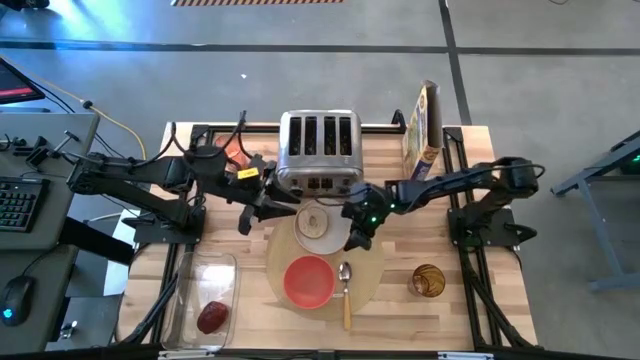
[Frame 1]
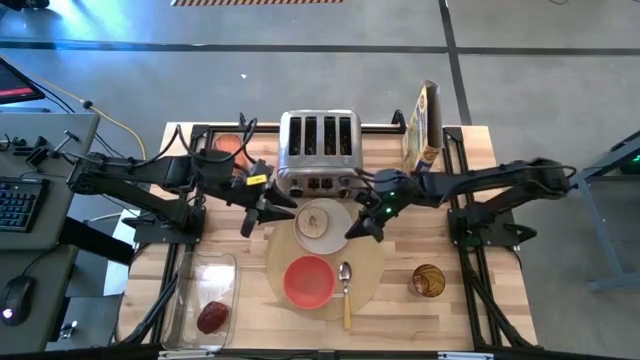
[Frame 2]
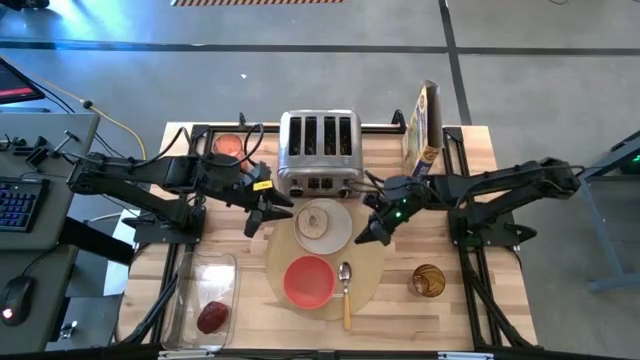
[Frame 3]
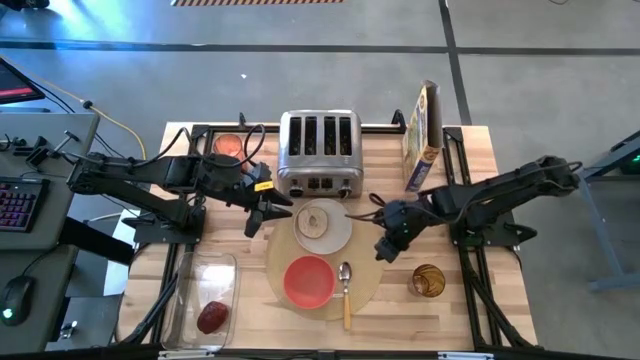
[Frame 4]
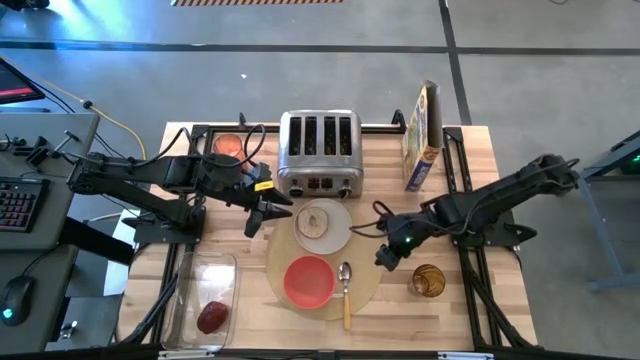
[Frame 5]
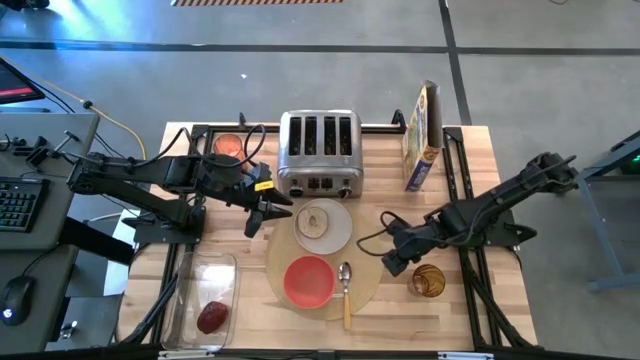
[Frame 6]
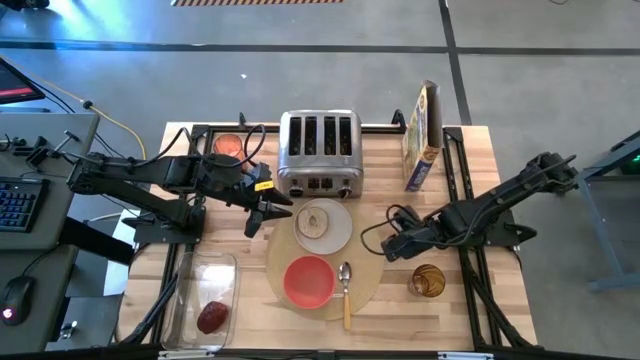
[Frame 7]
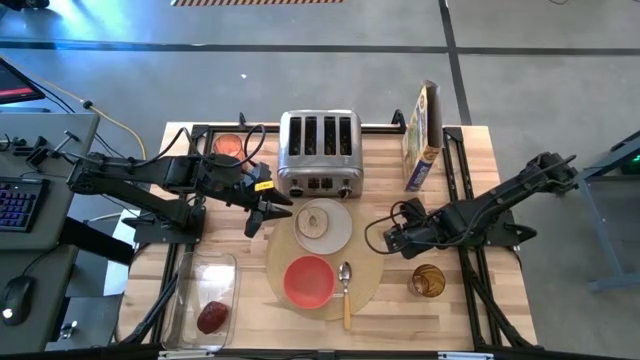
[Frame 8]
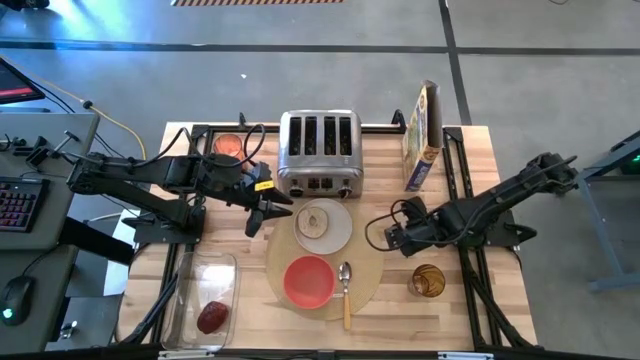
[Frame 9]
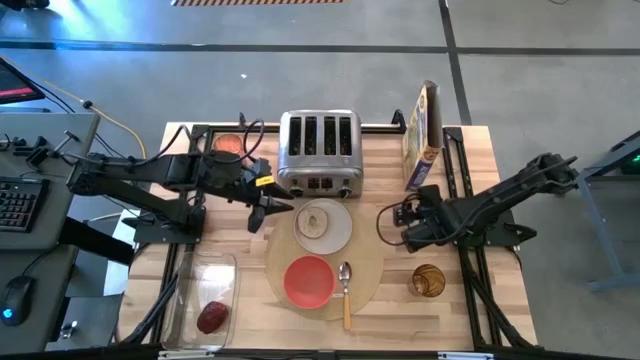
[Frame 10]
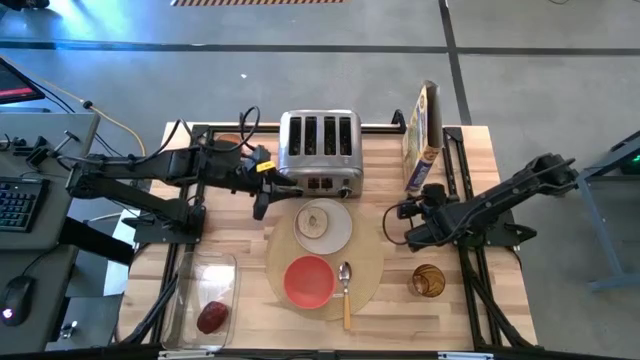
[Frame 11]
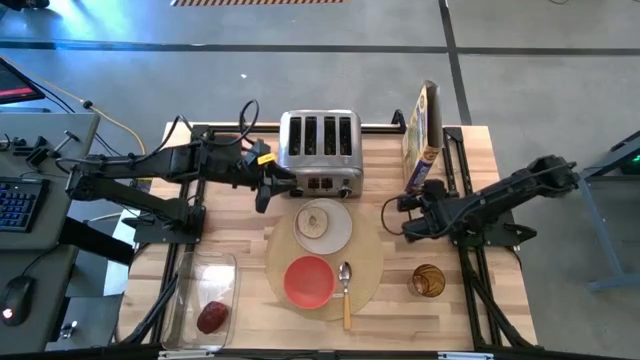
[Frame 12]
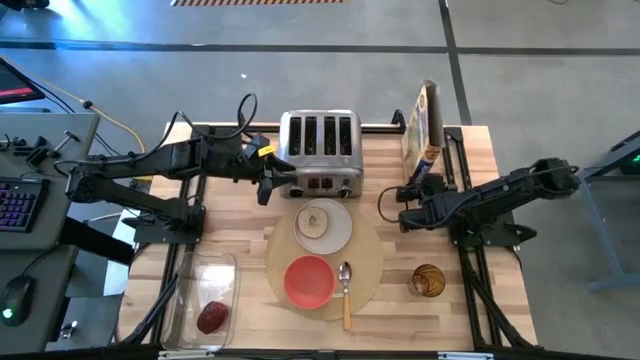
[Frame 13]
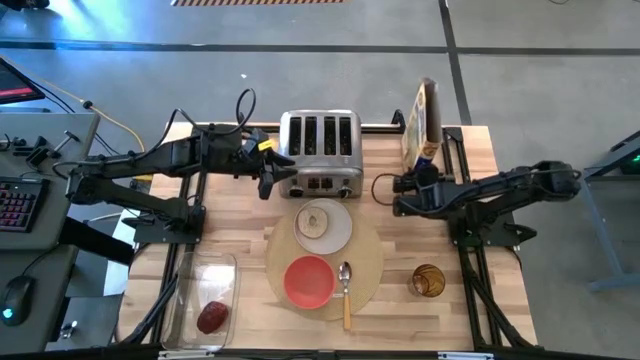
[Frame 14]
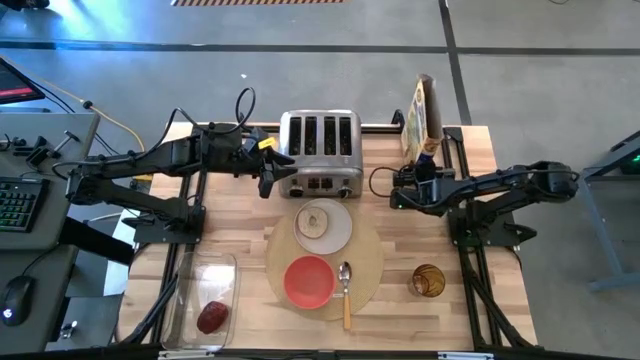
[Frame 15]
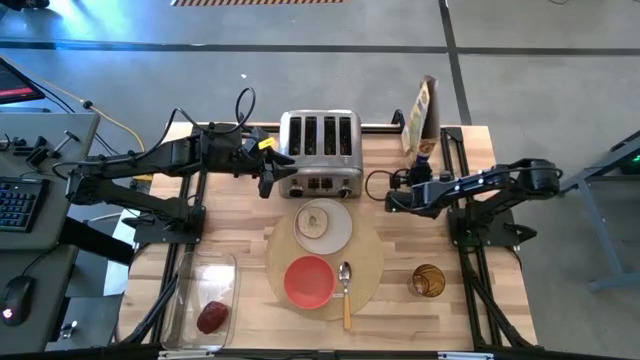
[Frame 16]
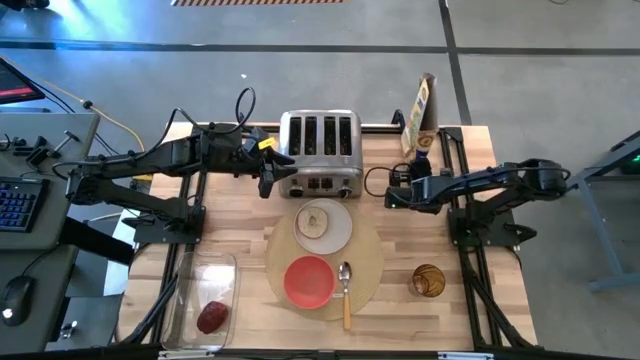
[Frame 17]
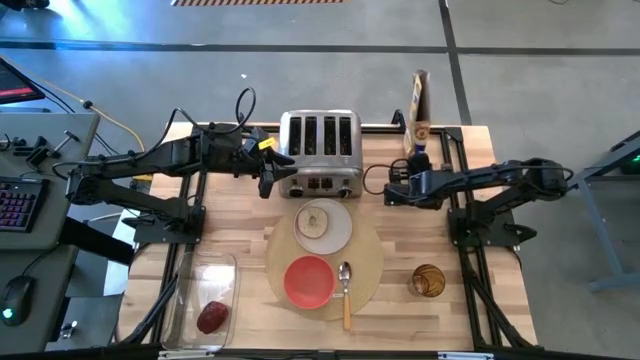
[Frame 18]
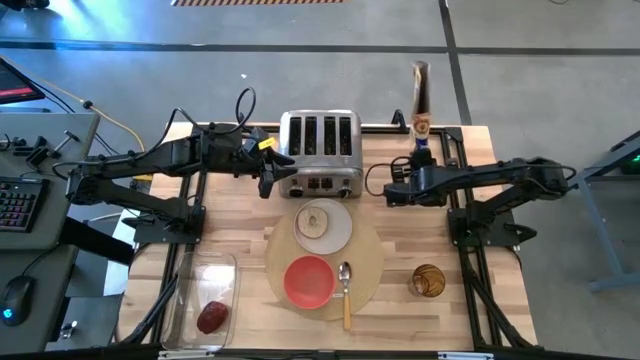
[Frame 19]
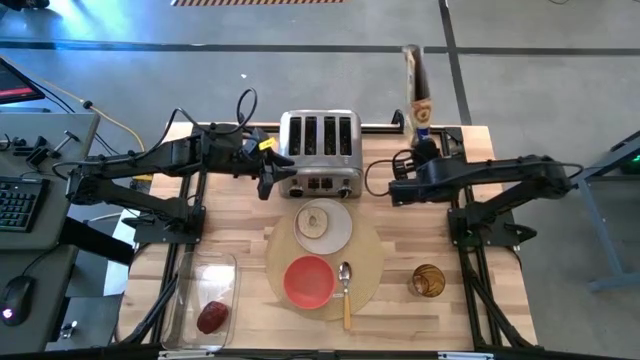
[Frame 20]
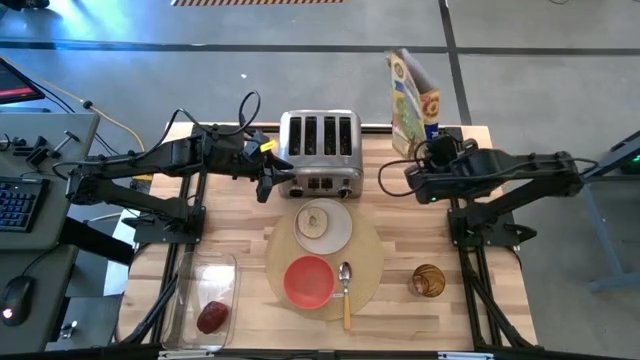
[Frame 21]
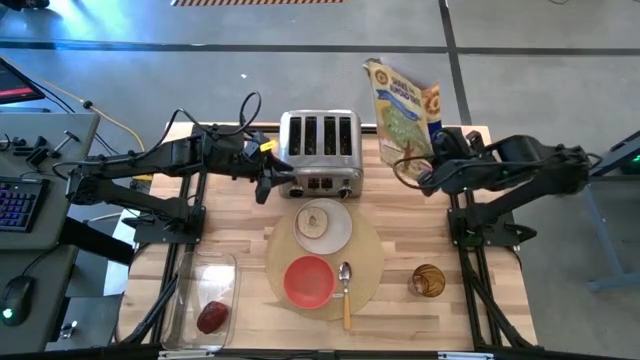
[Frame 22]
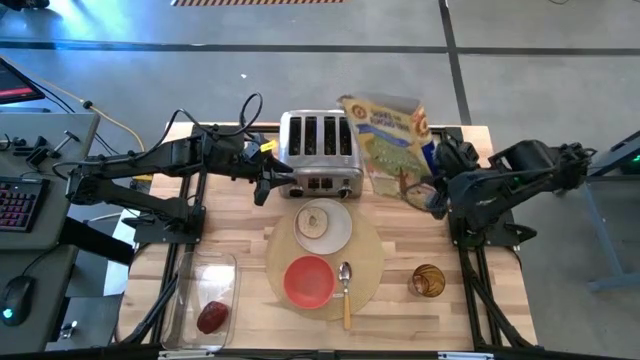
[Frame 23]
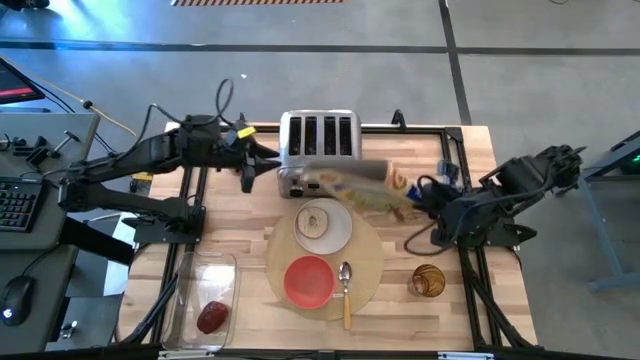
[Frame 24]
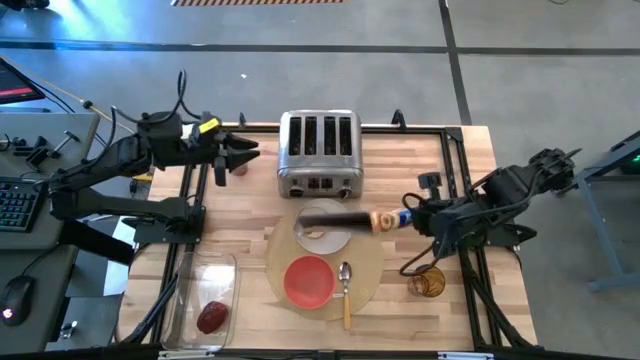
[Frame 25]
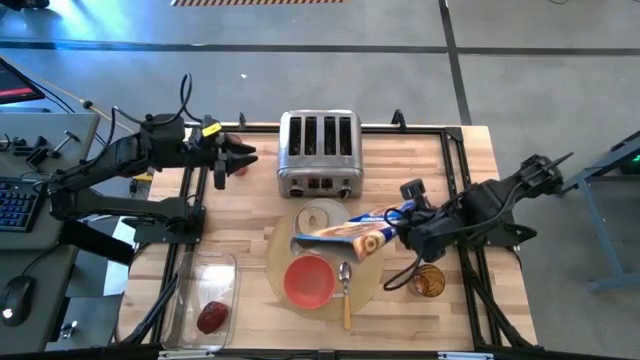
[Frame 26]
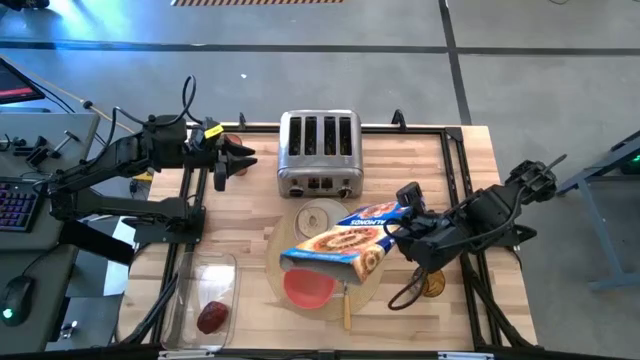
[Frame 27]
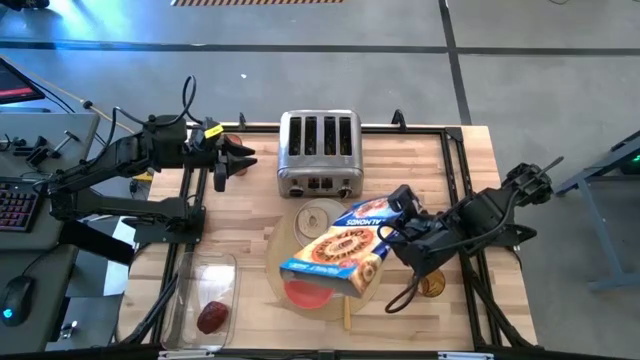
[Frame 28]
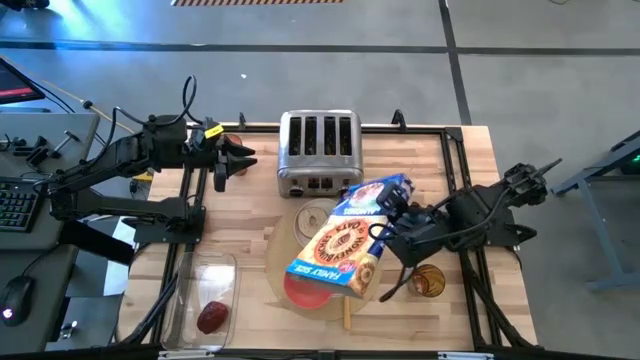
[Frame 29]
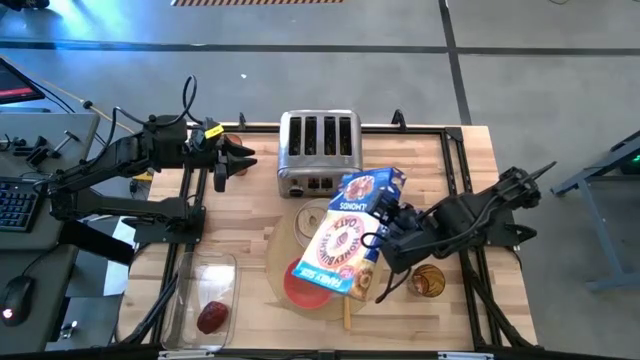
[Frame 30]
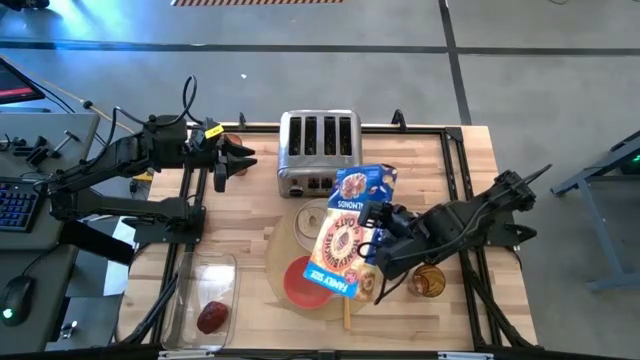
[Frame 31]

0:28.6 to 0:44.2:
Task: Arrange a breakfast setting
Pour the cereal into the bowl

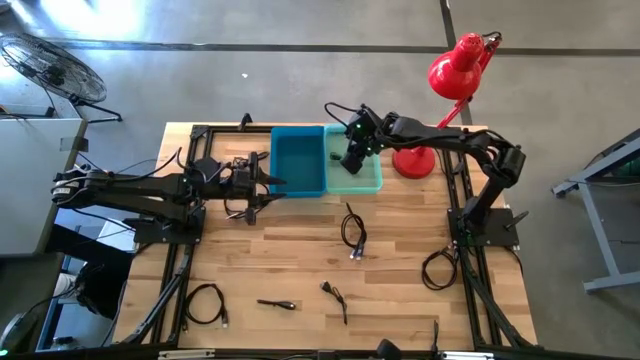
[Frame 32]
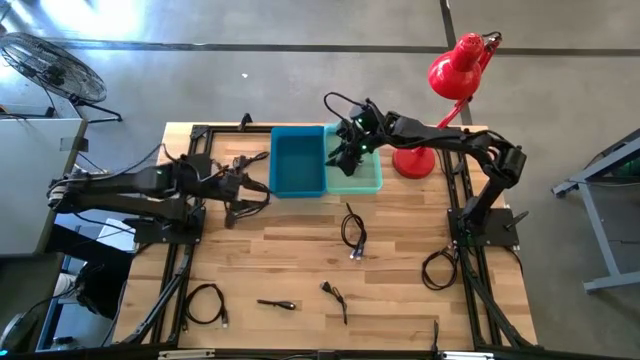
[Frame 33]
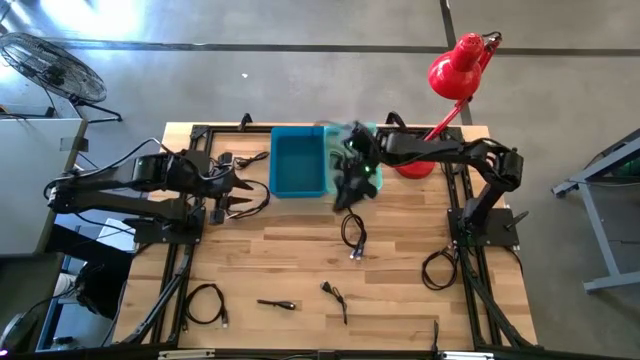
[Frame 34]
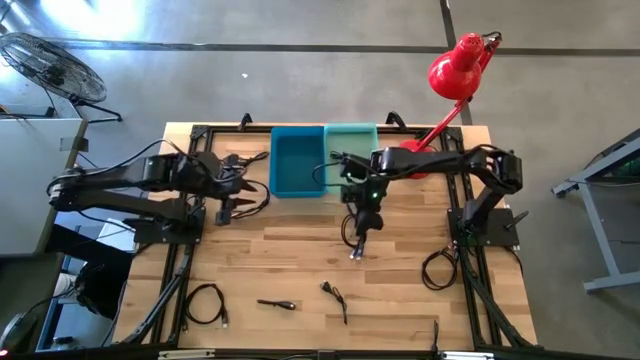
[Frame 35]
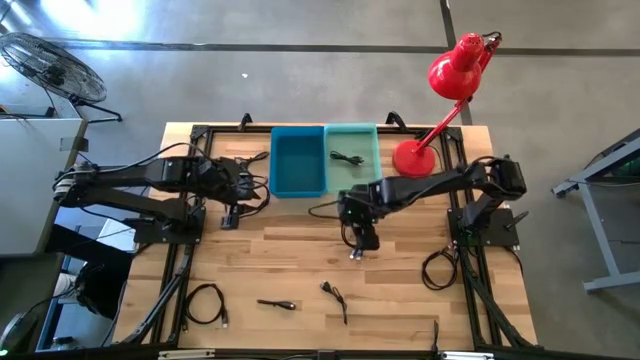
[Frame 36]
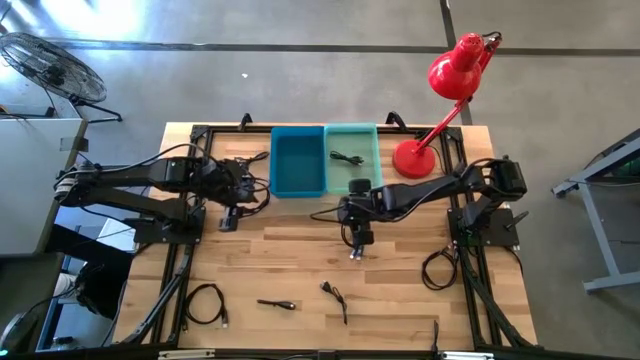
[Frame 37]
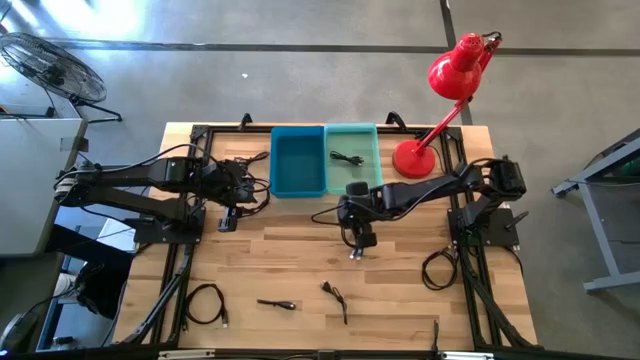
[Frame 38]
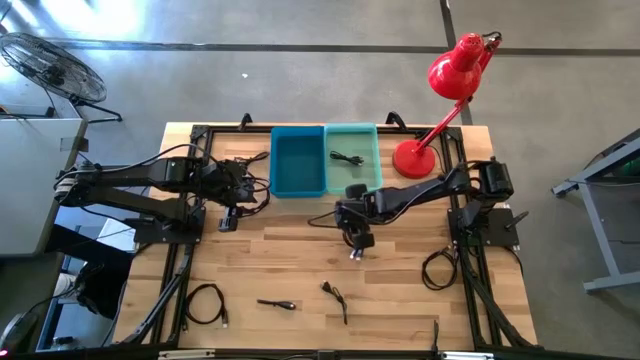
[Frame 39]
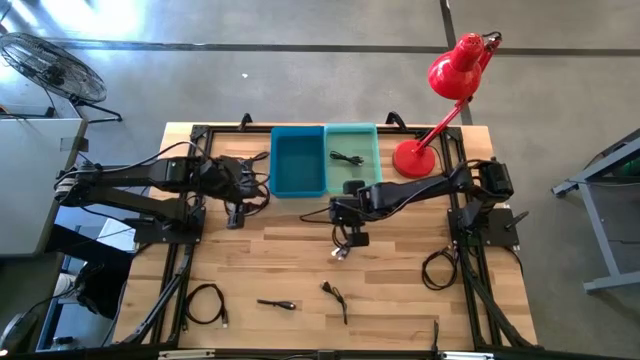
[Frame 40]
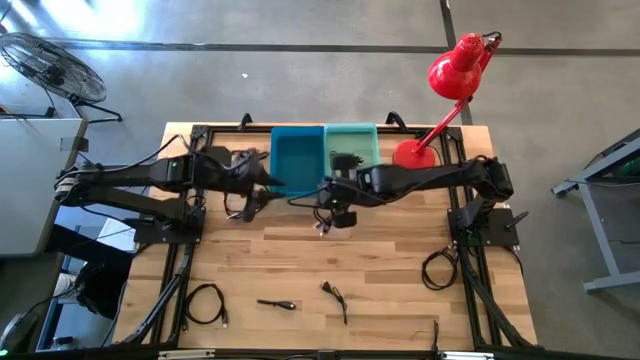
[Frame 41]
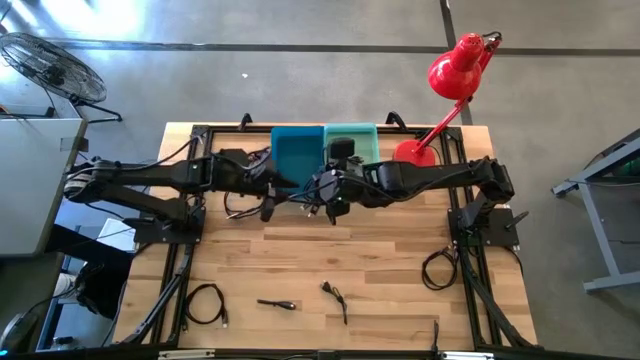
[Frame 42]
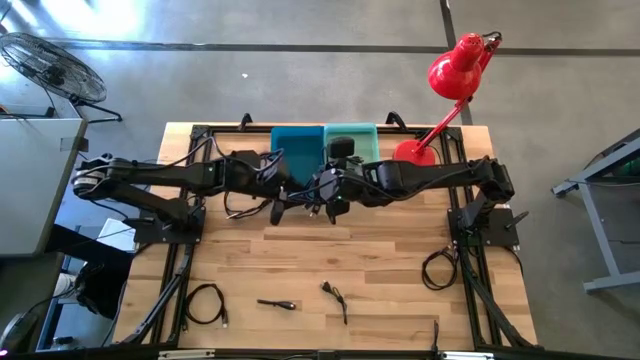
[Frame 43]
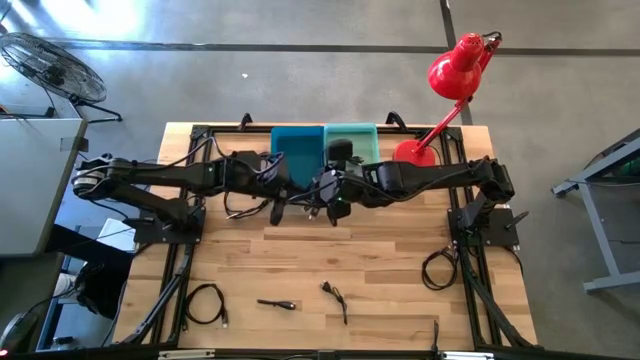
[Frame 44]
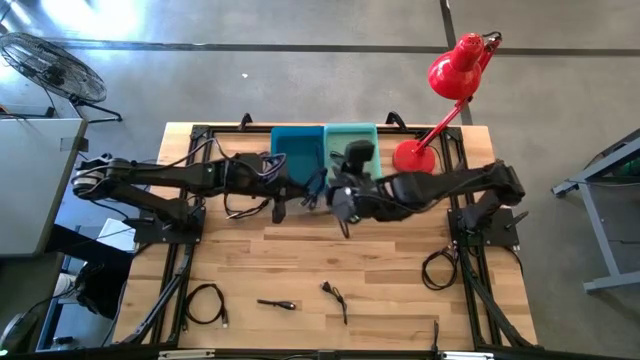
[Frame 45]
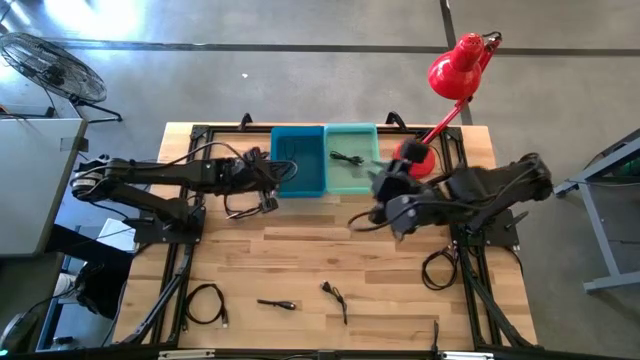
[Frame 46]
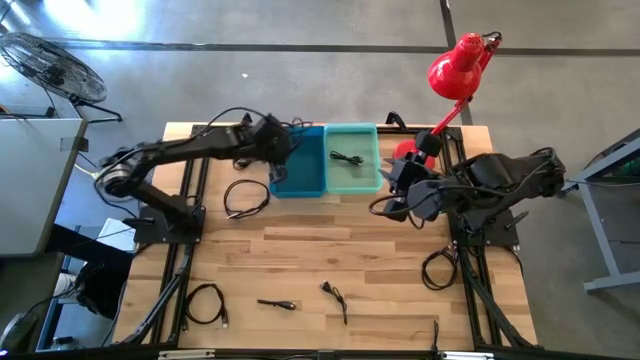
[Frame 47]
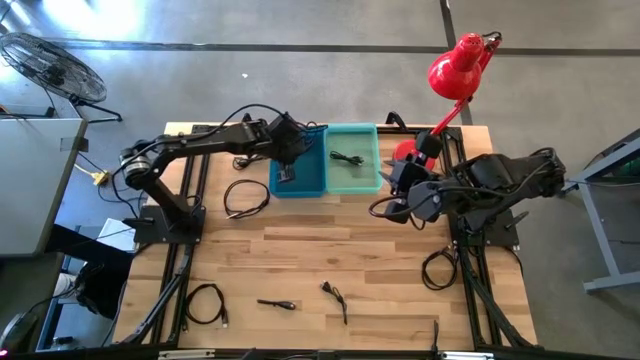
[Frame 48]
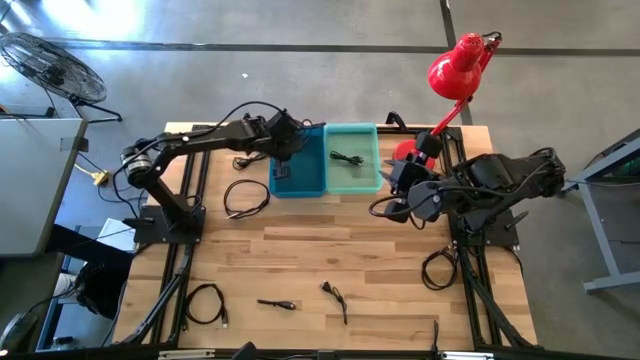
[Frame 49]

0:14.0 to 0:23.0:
Task: Pick & Place USB Port
Put the black HDMI cable into the blue bin
